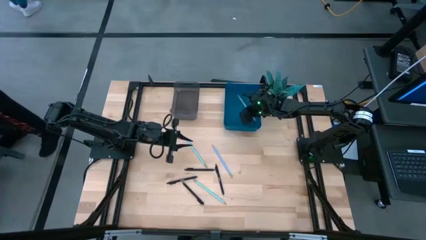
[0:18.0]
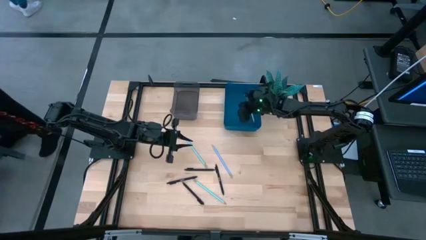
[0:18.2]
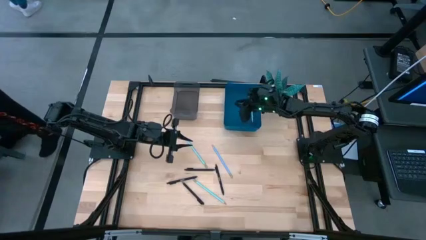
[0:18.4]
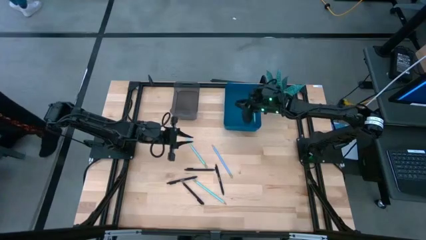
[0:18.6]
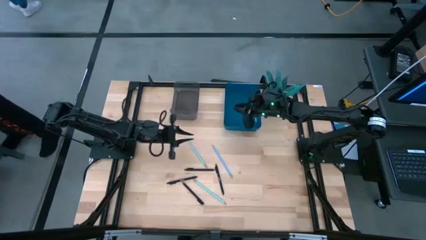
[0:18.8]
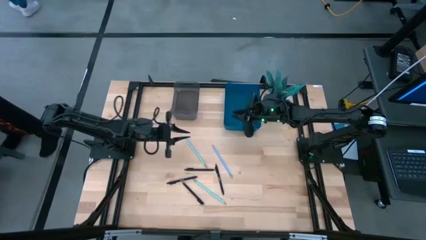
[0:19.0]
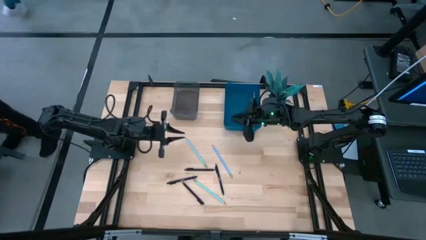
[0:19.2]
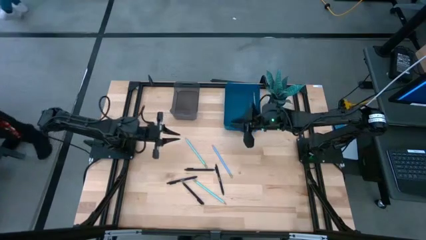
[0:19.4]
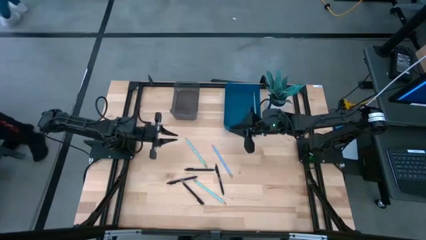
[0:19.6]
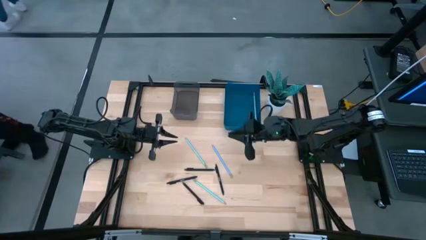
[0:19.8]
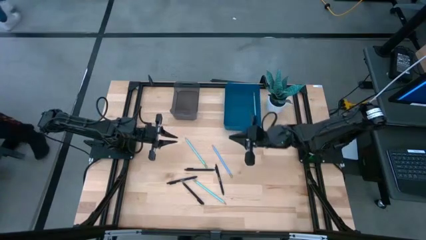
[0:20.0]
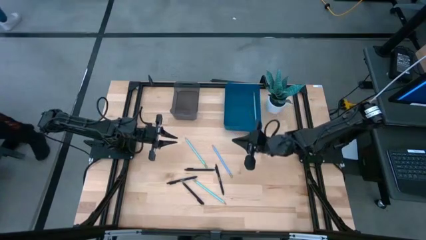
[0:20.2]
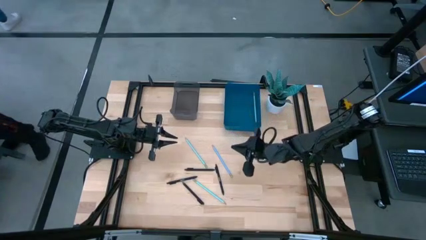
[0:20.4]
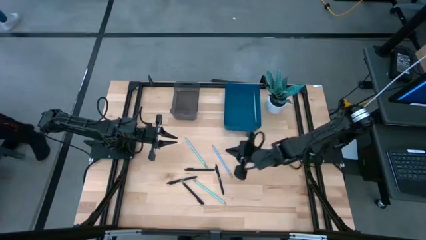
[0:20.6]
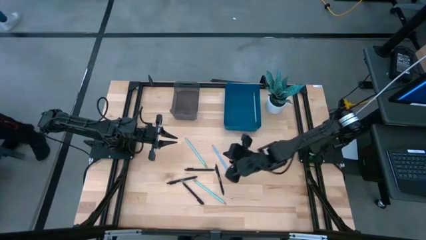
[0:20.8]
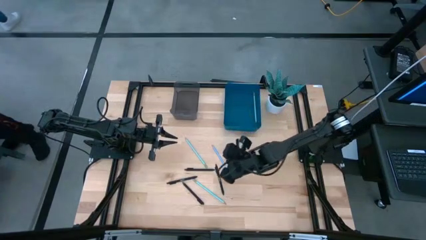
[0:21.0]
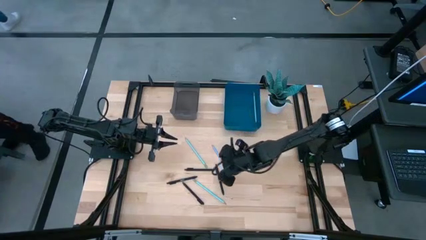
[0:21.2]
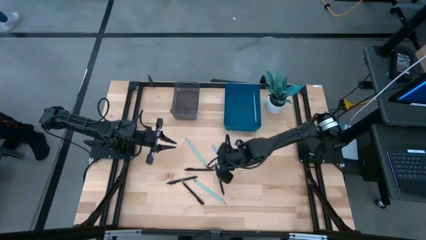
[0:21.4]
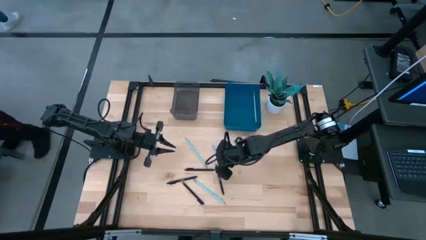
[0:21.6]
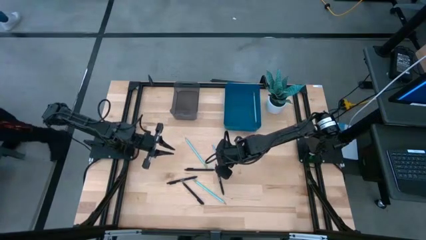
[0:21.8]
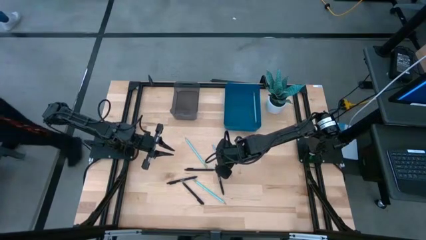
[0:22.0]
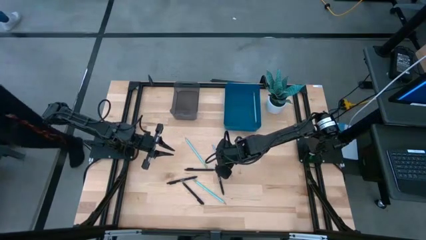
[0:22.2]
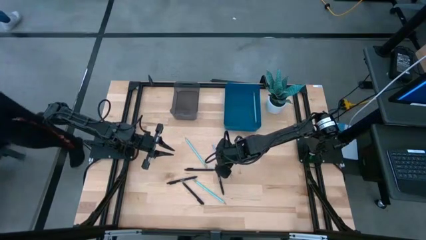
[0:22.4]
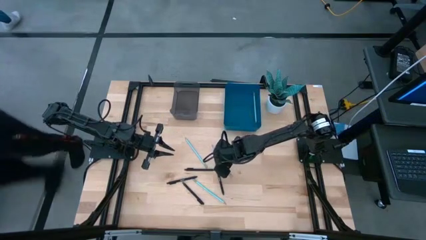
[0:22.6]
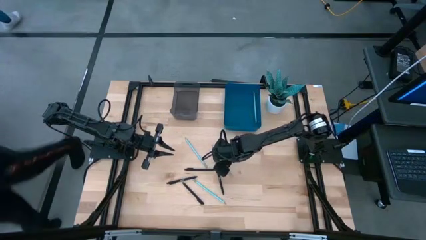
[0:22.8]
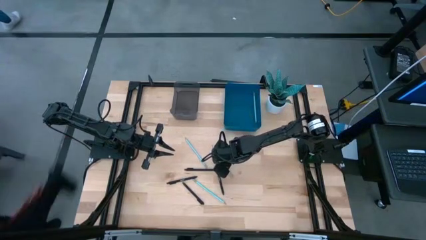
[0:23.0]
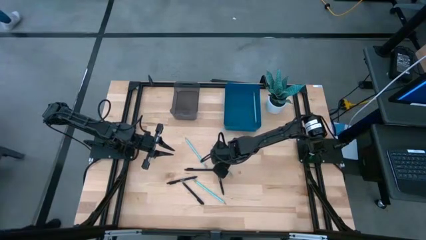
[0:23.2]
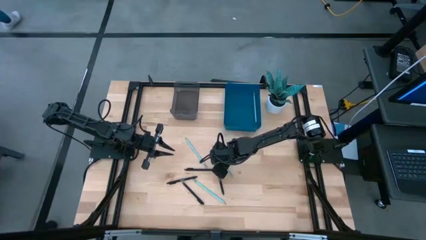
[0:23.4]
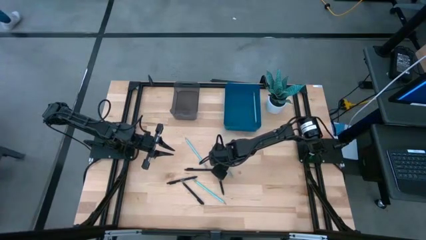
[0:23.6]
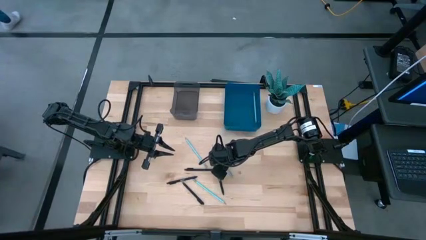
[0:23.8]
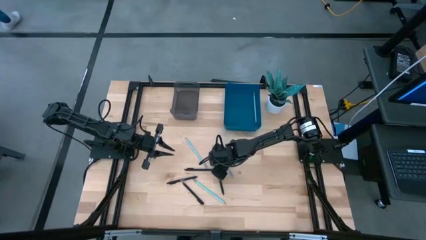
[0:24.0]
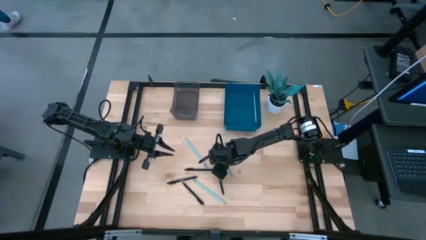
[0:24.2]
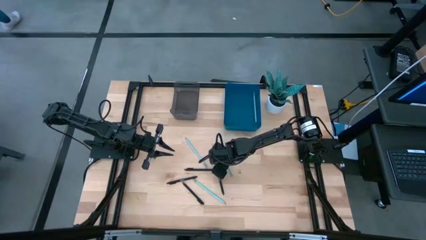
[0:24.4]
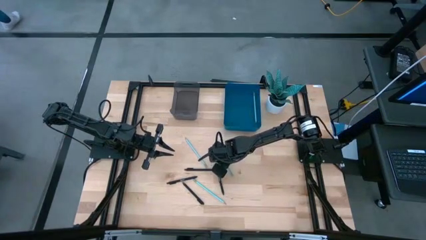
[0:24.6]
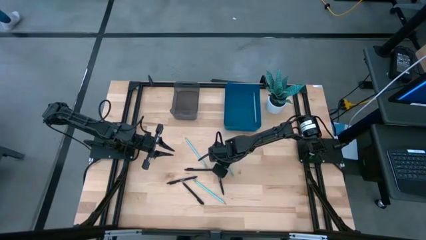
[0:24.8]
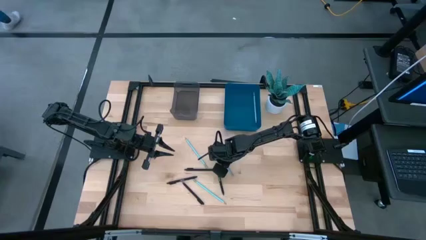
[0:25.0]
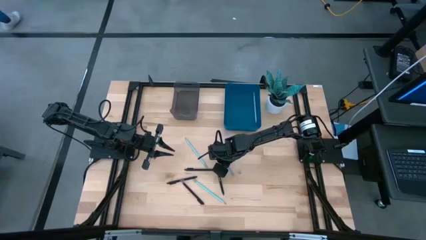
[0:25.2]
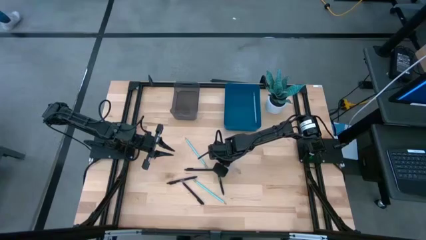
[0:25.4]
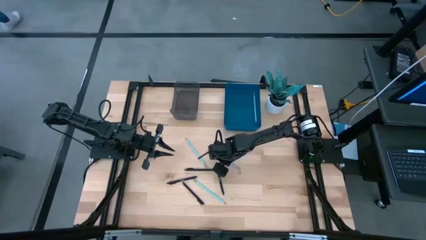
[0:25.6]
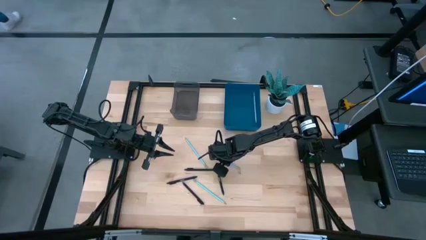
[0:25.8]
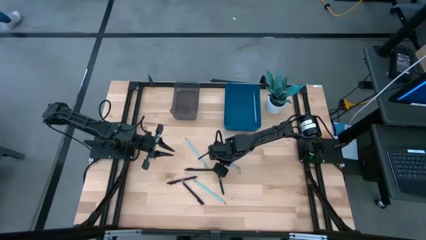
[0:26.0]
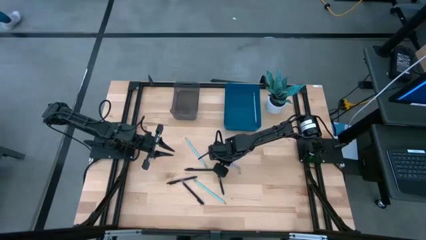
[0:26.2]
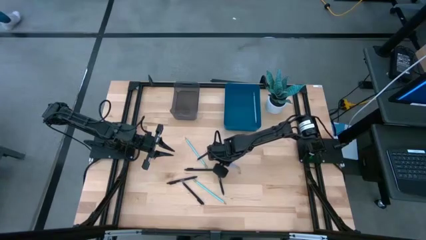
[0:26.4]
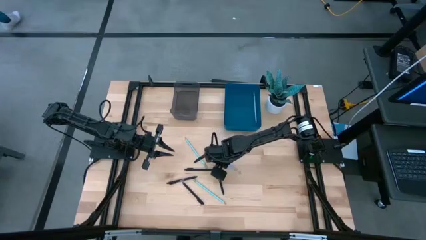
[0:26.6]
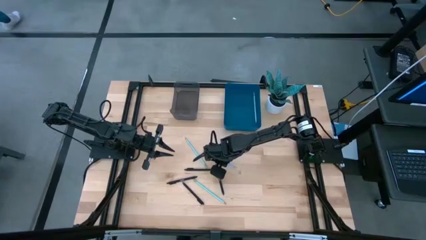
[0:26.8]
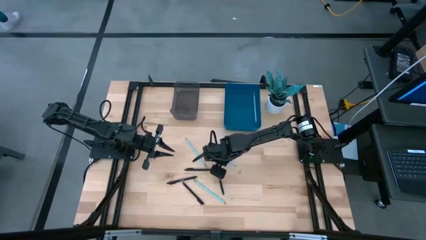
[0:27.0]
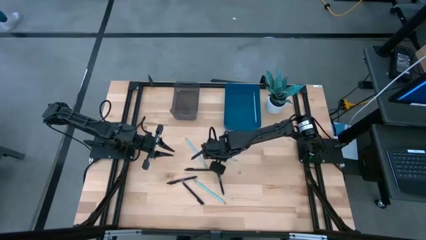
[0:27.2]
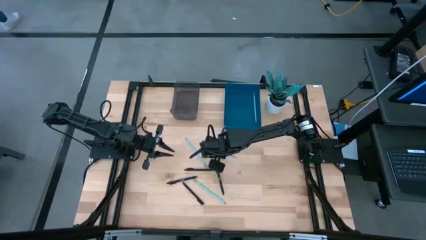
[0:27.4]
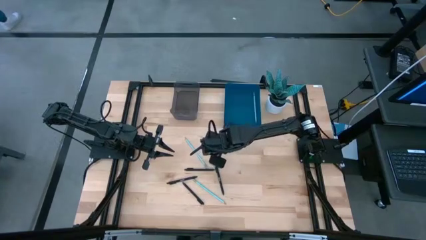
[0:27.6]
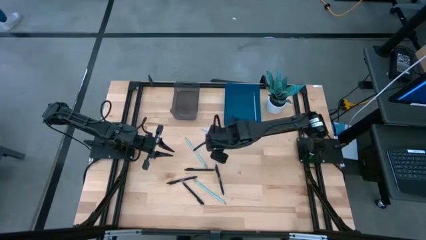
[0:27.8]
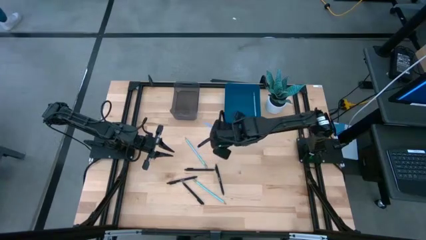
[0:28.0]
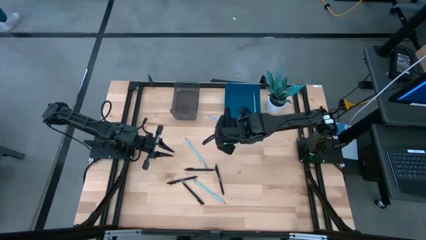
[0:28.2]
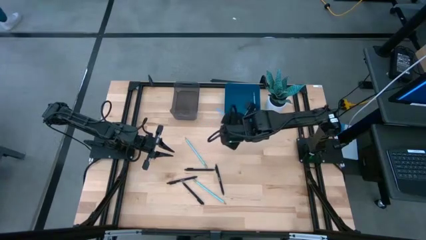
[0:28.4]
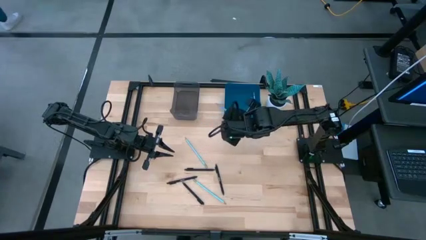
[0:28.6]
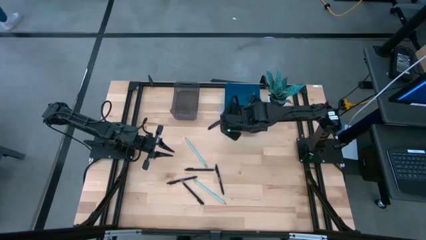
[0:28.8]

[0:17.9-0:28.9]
Task: Sort pens & pencils
Put the blue pencil into the blue bin
